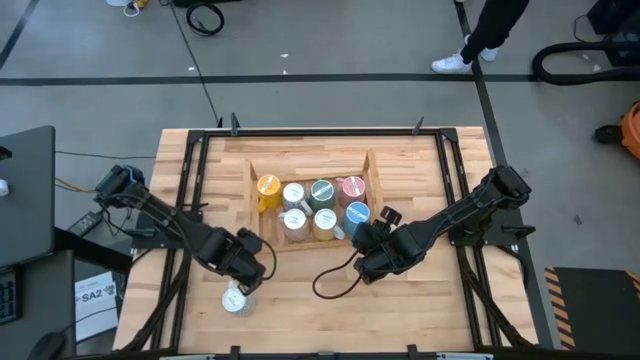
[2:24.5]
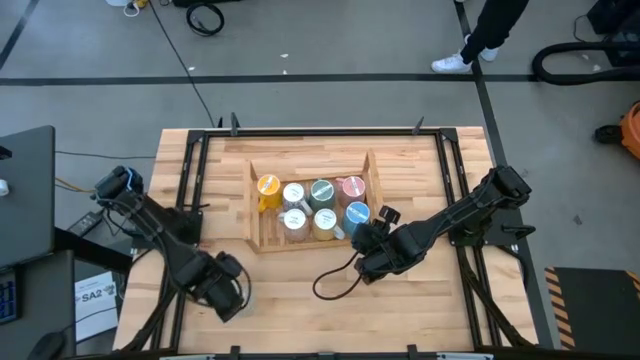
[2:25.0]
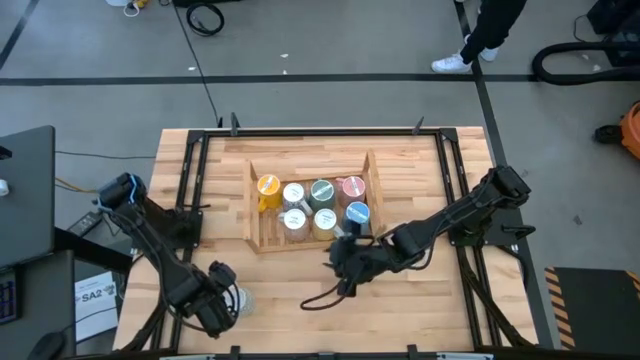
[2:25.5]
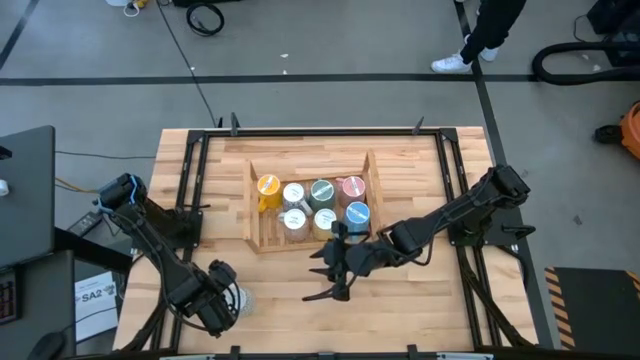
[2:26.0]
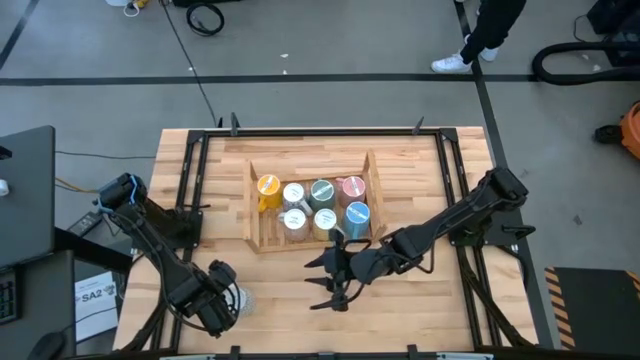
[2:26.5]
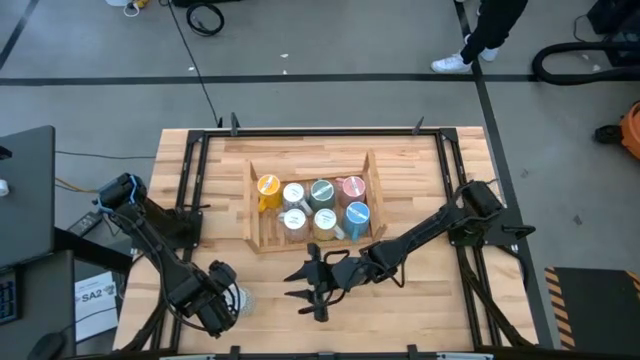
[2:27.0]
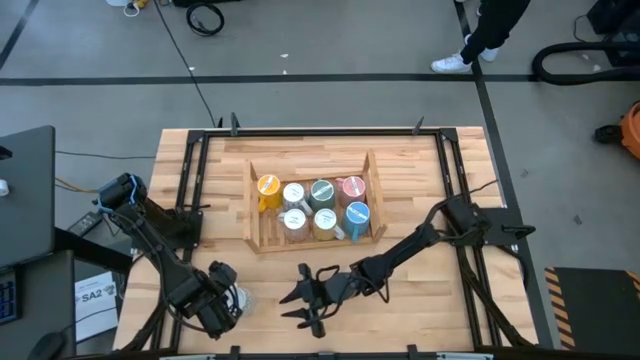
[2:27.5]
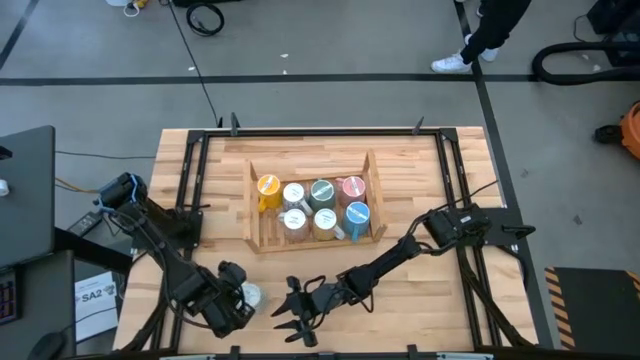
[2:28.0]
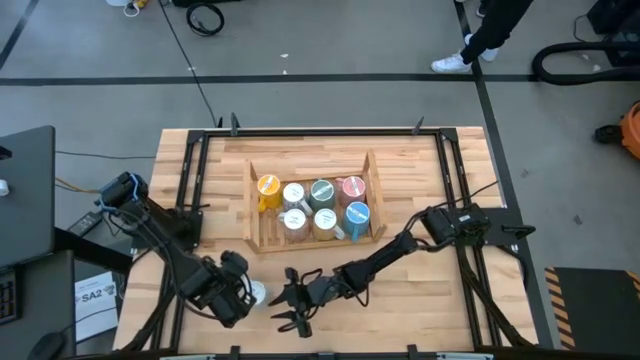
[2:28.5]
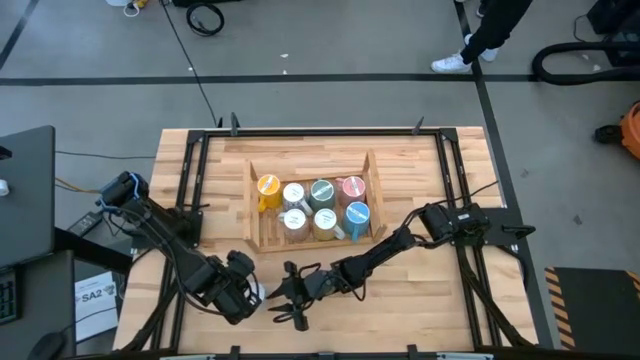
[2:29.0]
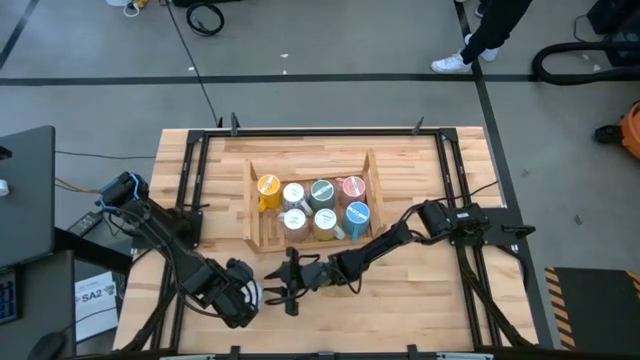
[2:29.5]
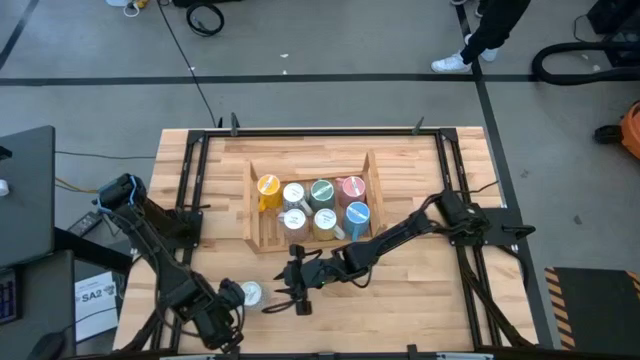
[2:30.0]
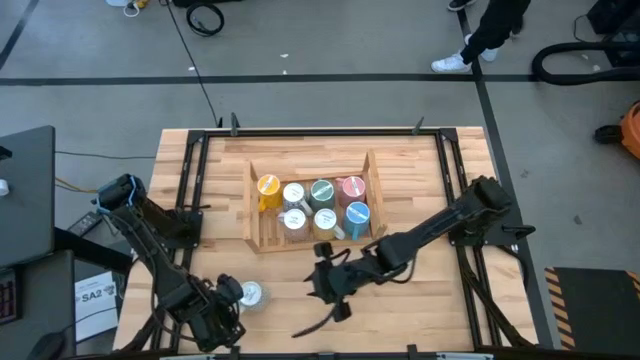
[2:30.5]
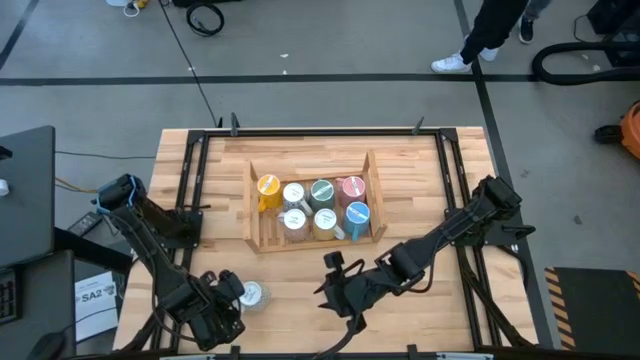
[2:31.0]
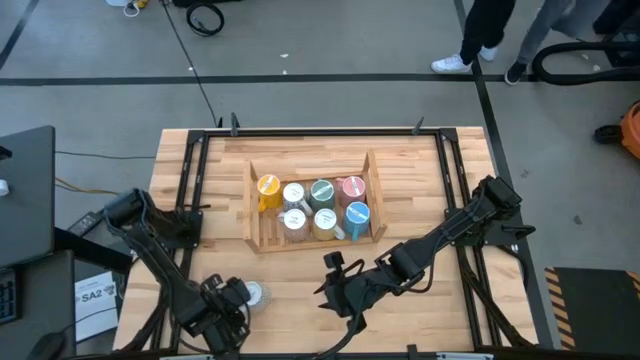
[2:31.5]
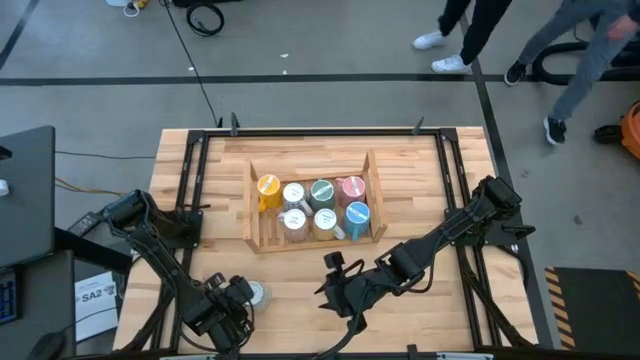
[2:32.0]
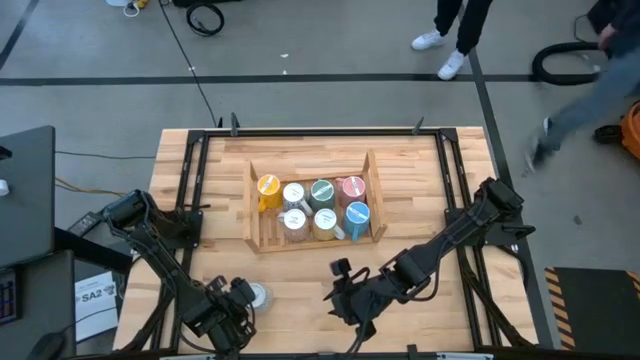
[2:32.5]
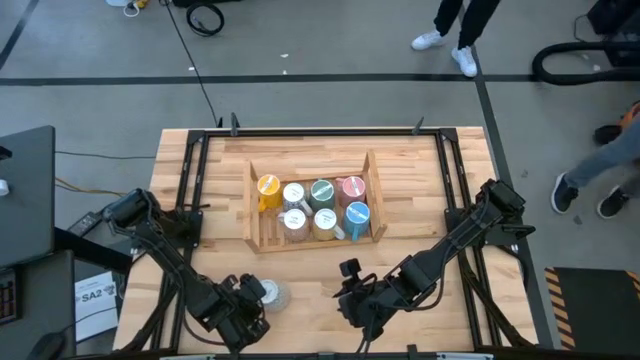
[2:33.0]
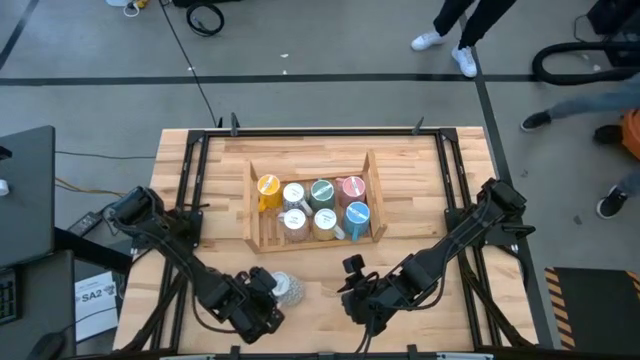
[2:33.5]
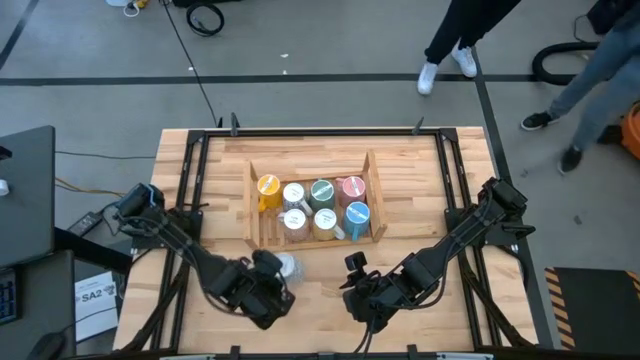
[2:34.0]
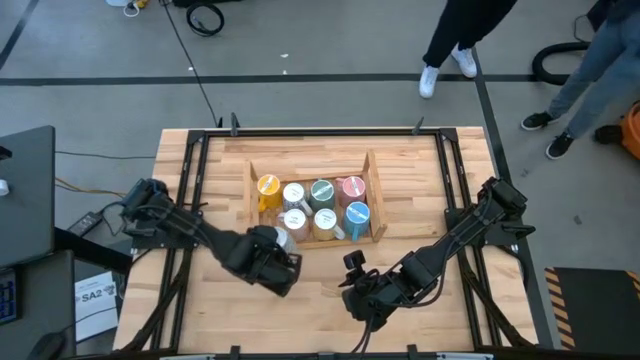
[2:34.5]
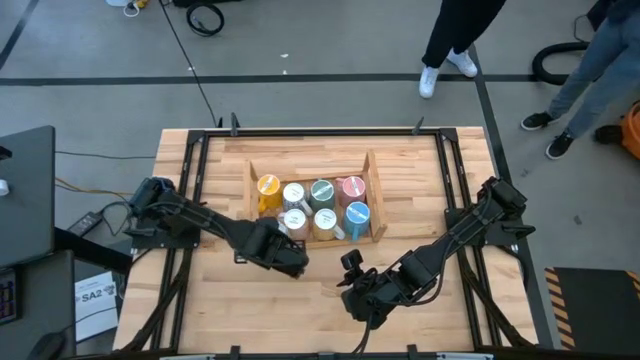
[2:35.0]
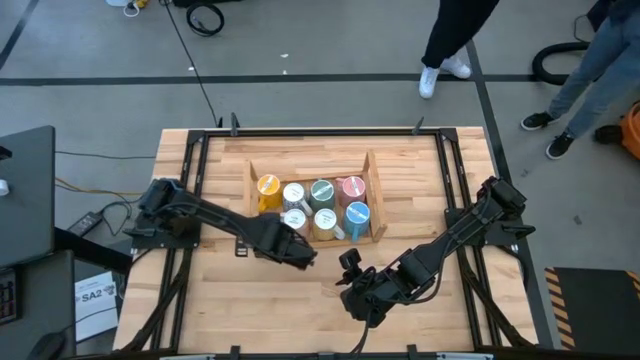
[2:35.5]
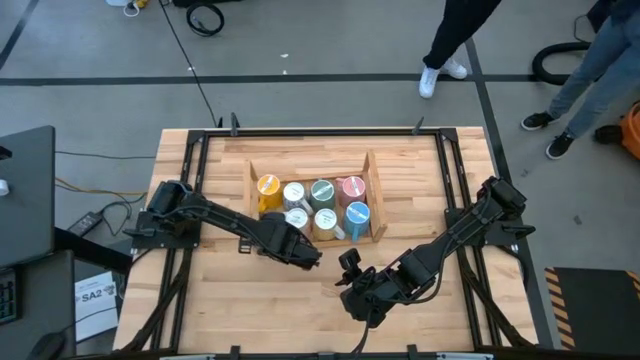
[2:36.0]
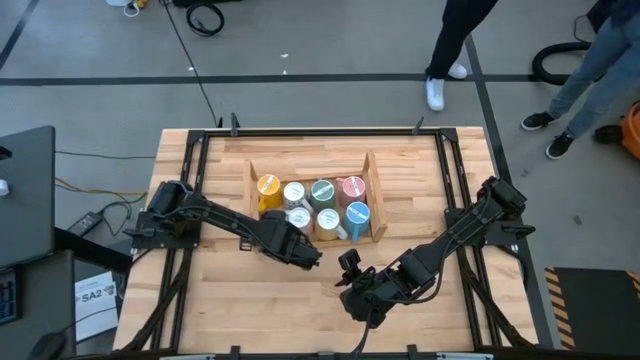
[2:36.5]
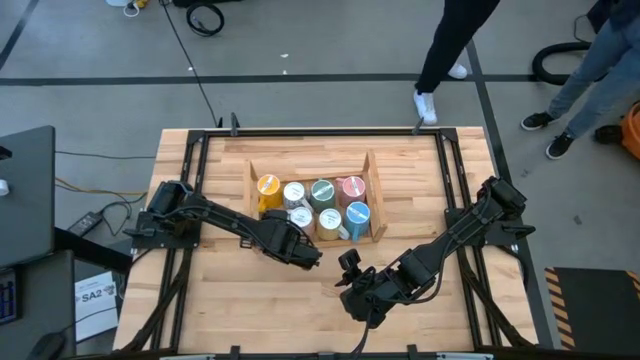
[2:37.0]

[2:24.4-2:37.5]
Task: Place coffee mugs
Put the gray patterned mug on the shelf

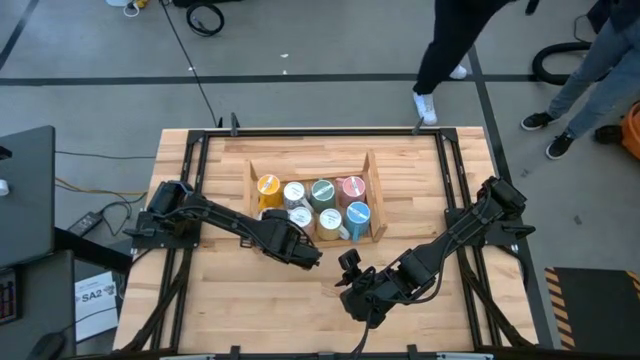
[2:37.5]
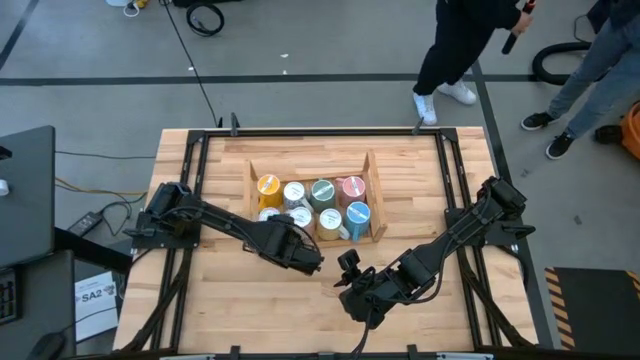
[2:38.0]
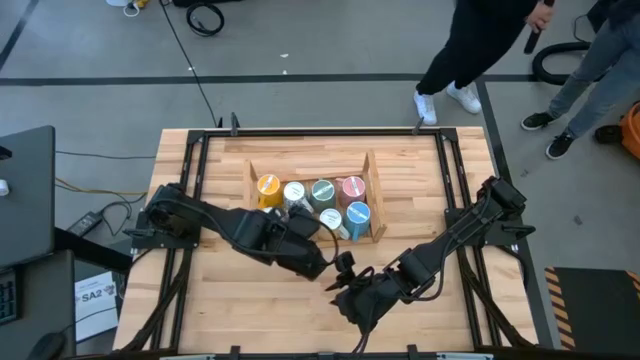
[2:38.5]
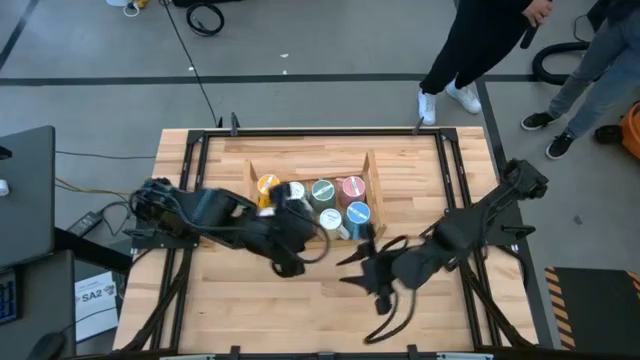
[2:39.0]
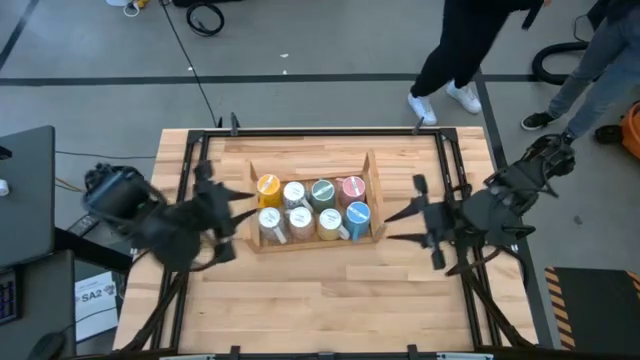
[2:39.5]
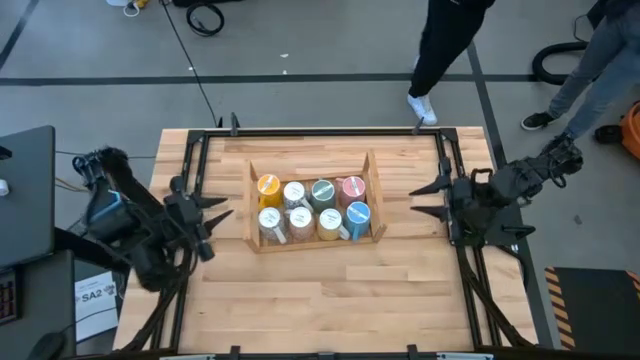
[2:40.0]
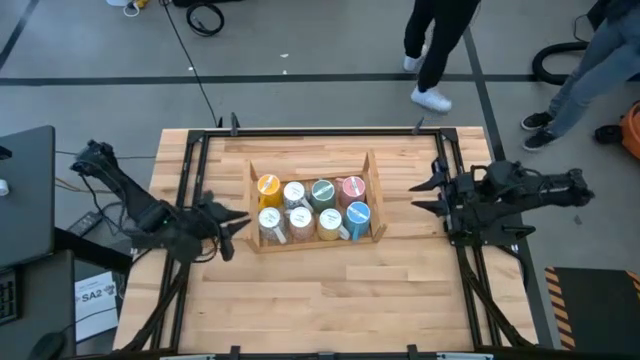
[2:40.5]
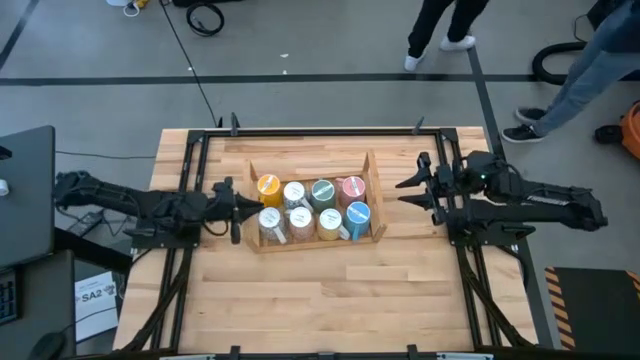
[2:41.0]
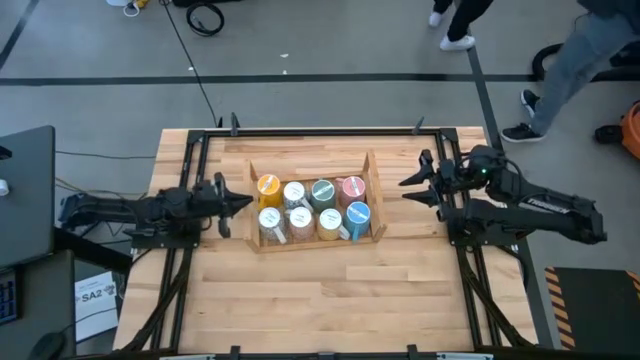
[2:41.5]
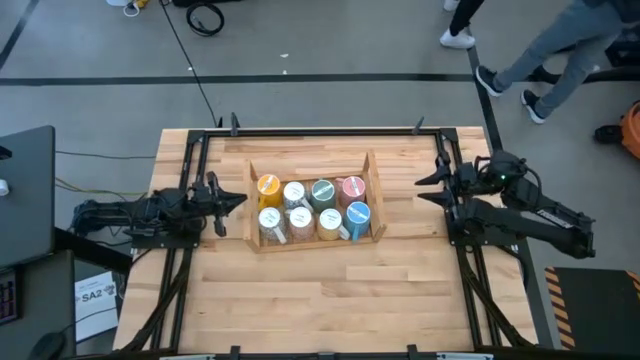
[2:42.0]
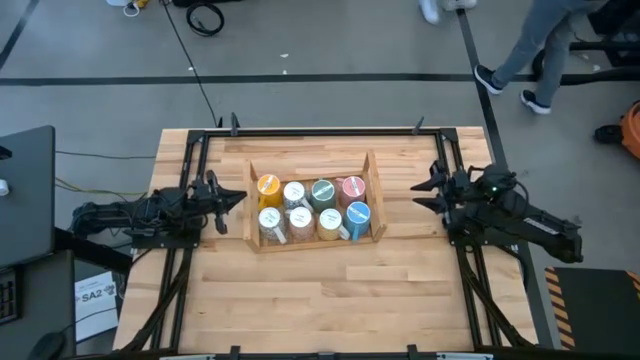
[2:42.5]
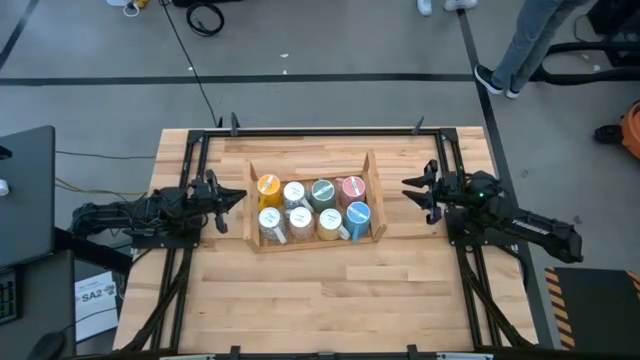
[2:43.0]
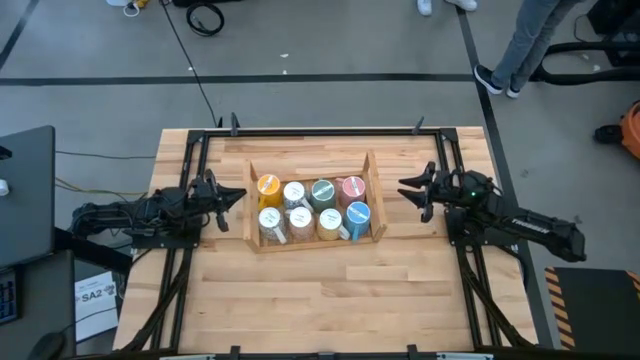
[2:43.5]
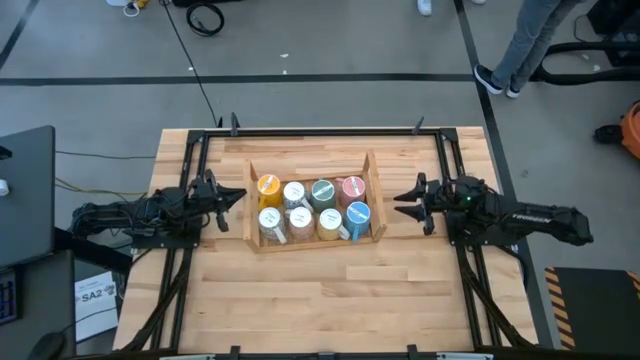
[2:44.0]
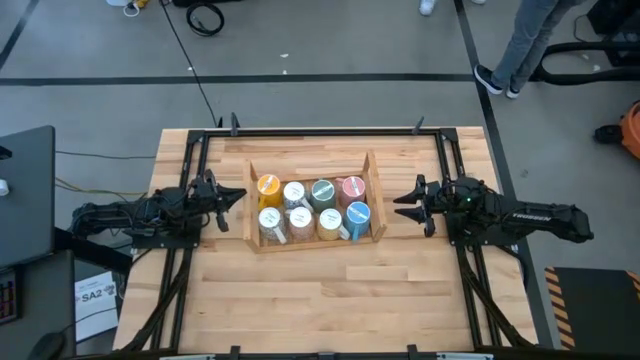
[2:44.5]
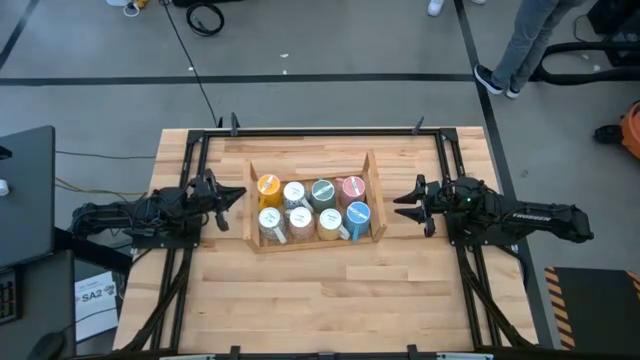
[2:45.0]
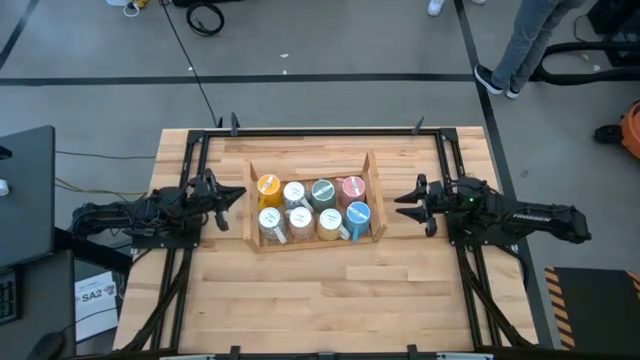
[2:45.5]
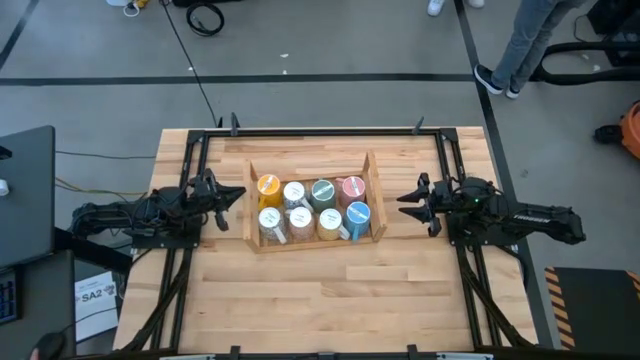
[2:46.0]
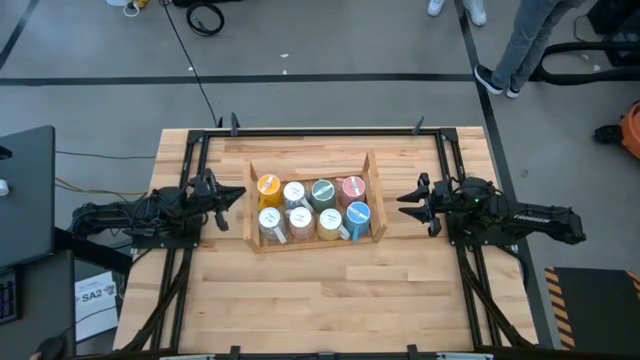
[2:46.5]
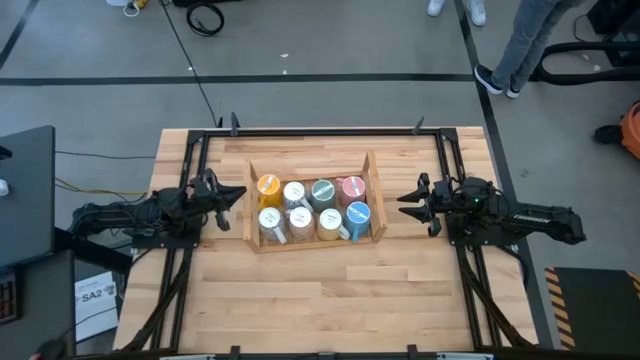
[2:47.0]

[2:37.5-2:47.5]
Return to Home Position
